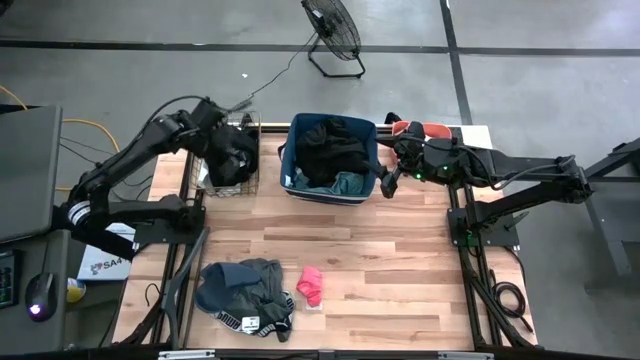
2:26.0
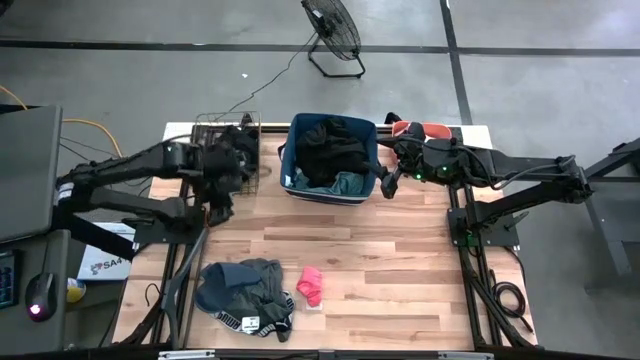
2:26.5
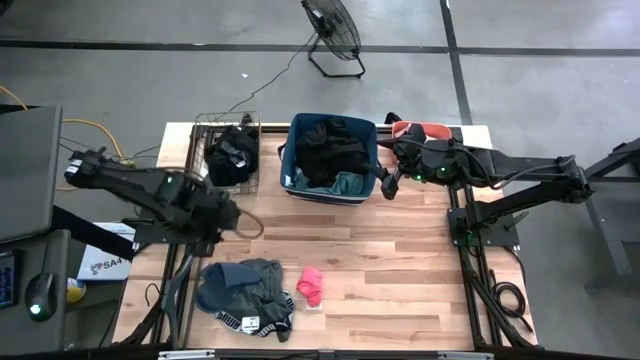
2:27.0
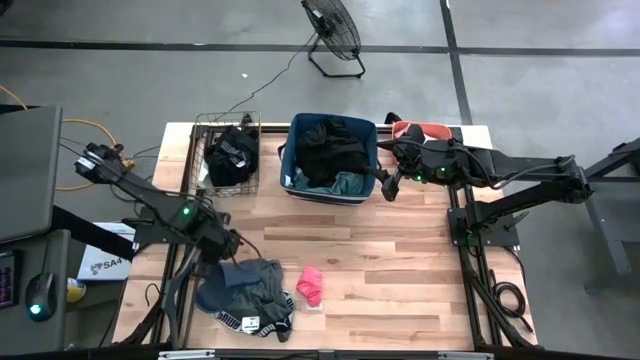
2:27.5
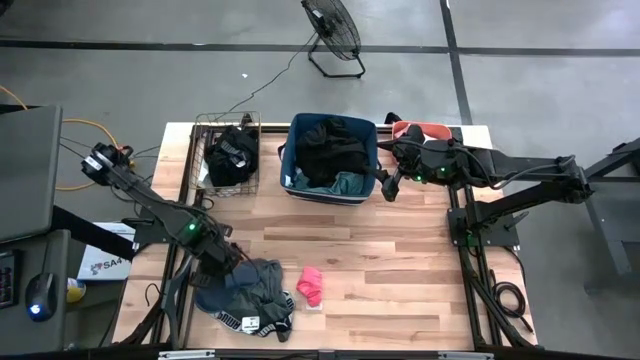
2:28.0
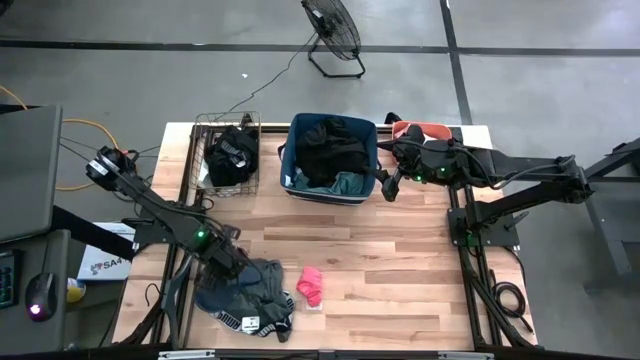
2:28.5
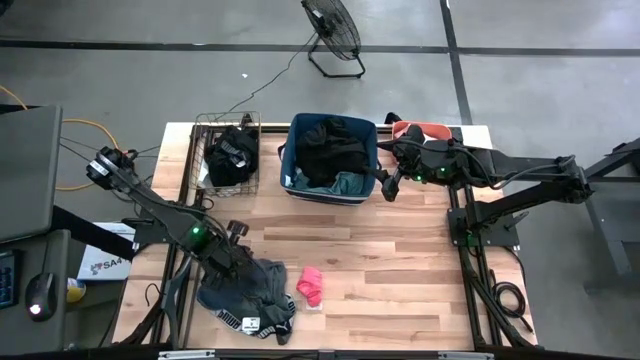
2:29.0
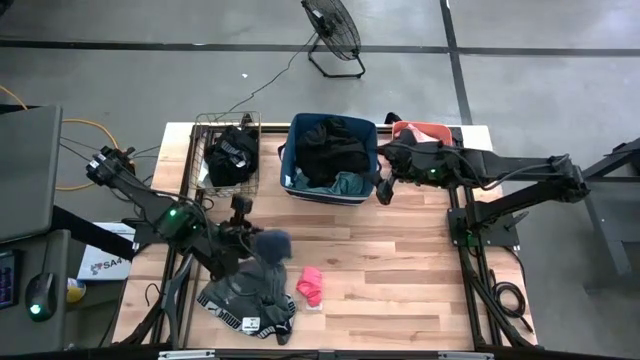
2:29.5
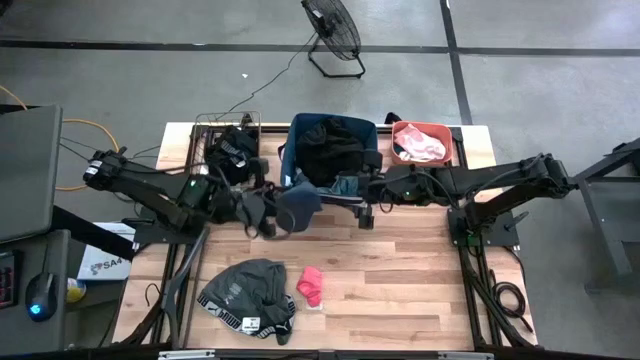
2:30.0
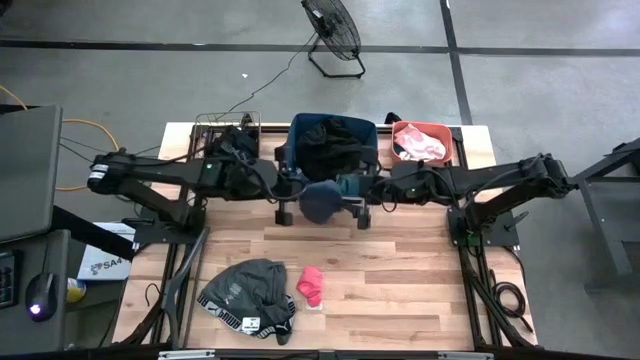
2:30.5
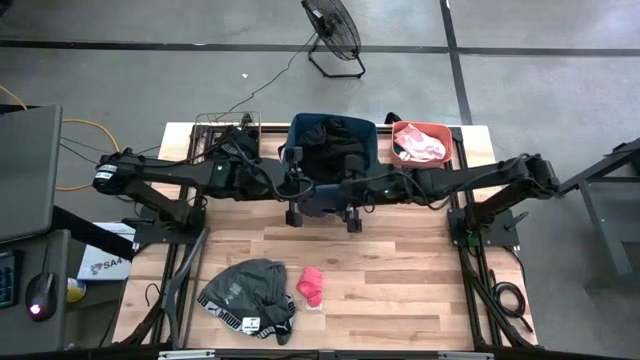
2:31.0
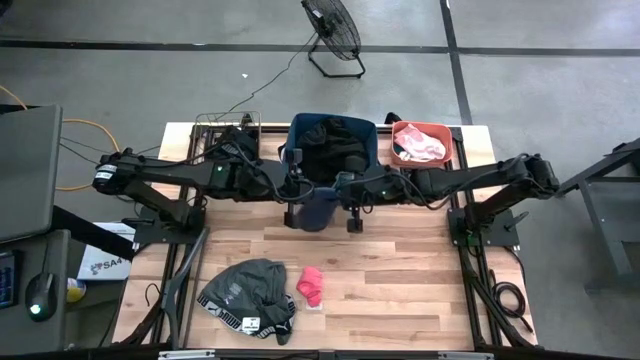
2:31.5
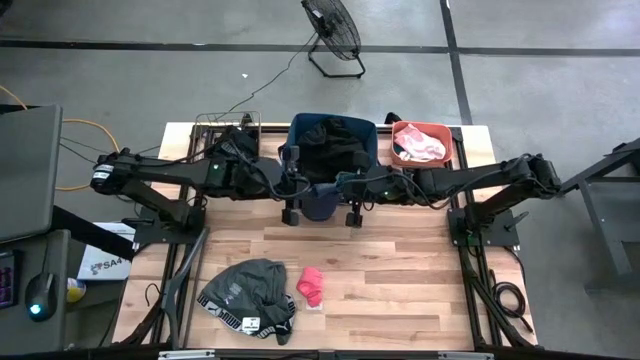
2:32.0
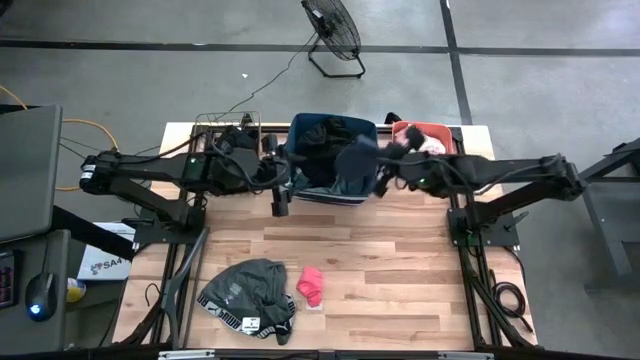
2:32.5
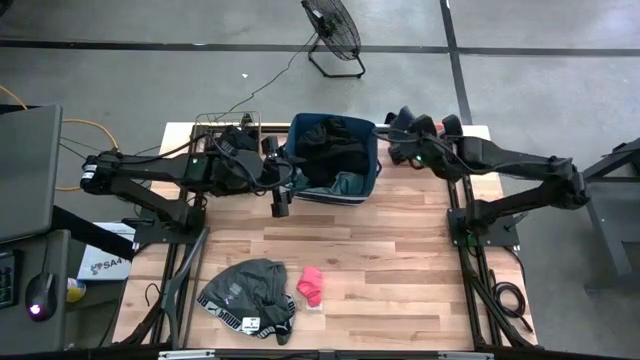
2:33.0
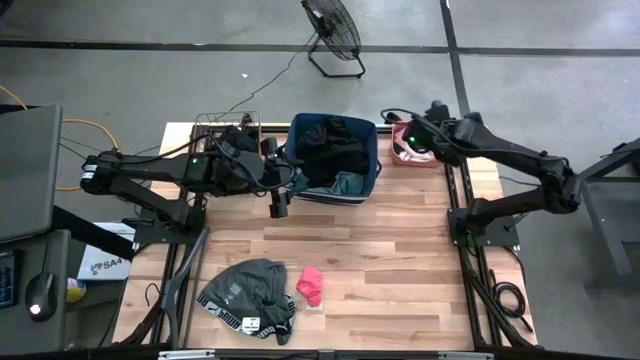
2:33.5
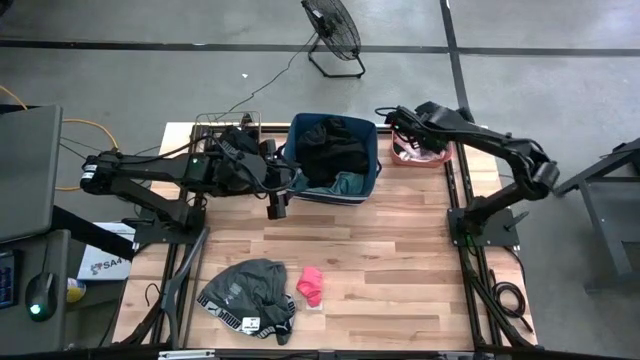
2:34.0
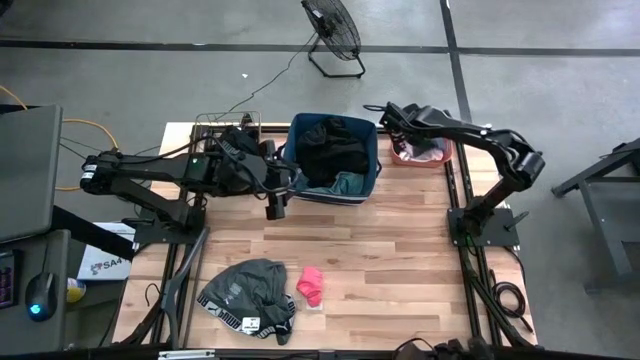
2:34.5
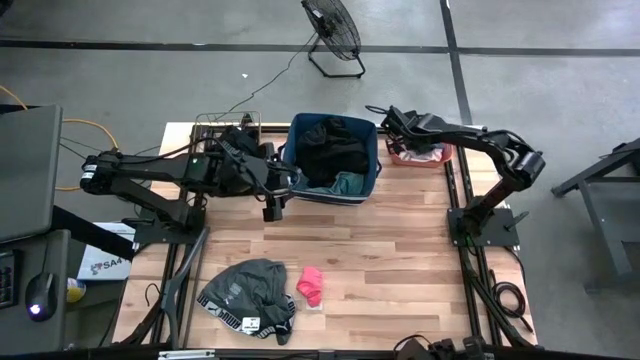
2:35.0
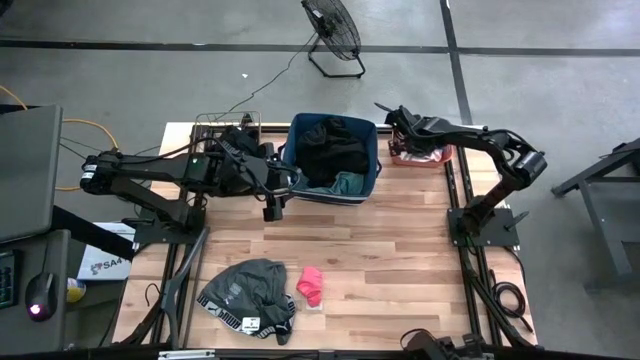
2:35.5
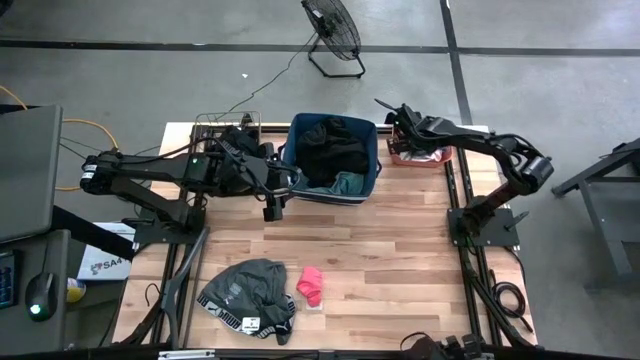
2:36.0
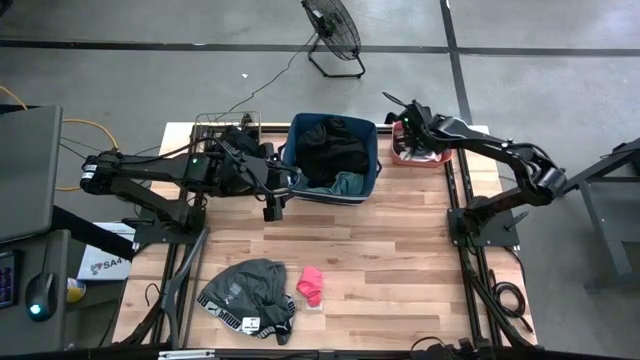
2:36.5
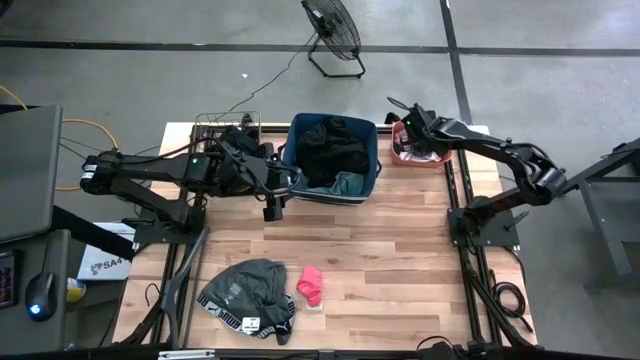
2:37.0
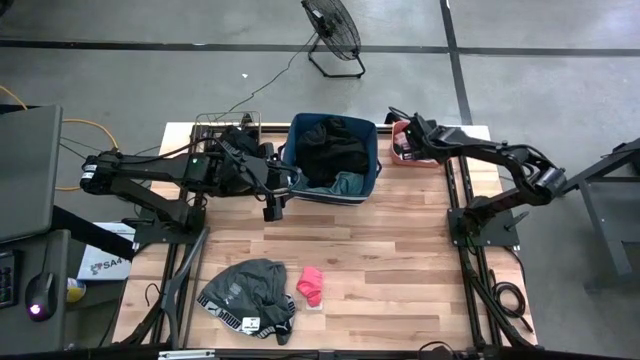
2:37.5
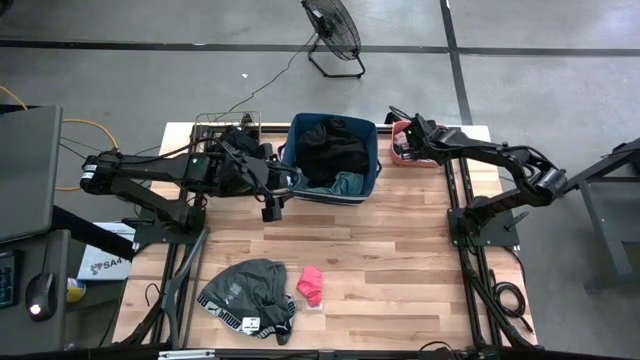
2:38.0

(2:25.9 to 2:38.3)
Task: Pick & Place Cloths
Put the blue sock into the orange bin

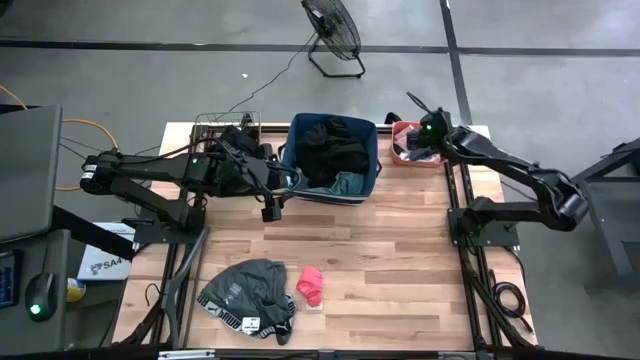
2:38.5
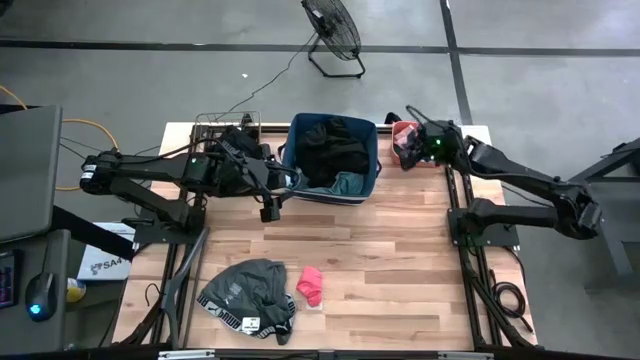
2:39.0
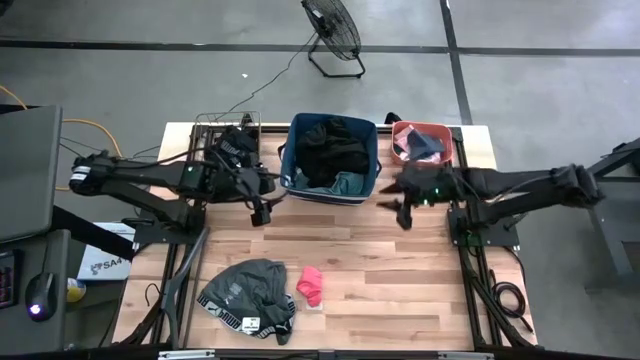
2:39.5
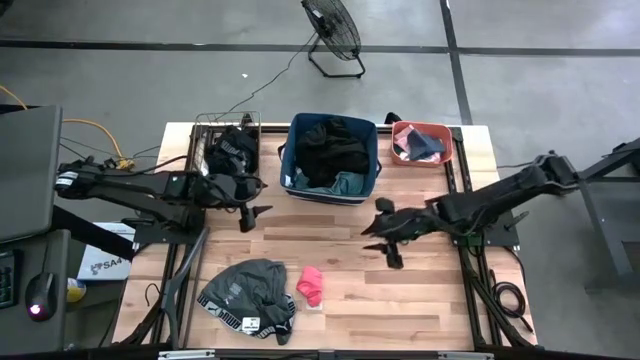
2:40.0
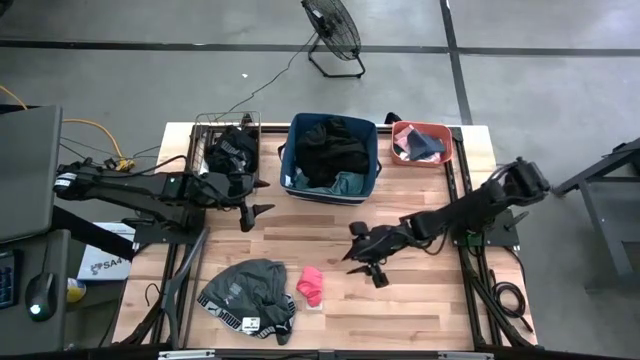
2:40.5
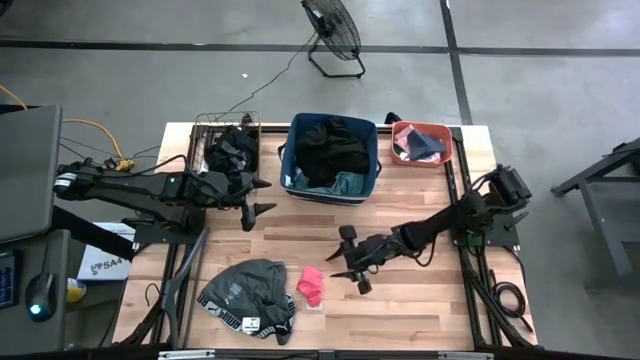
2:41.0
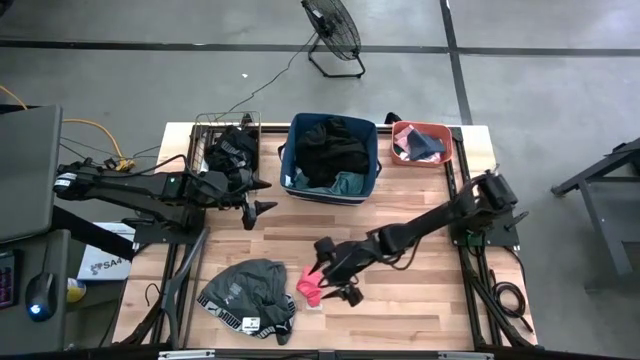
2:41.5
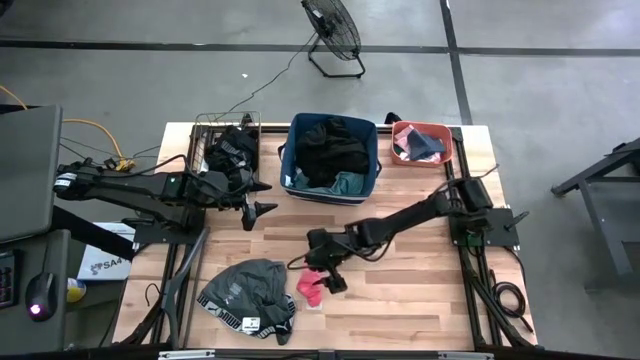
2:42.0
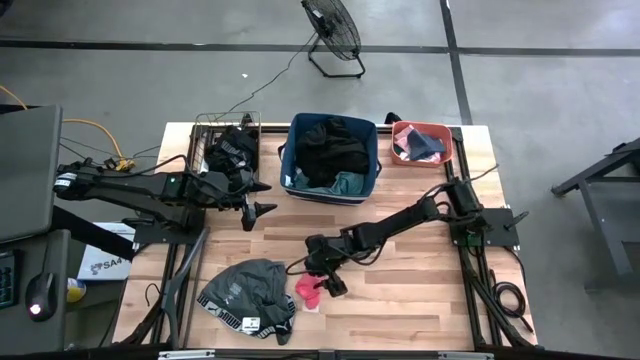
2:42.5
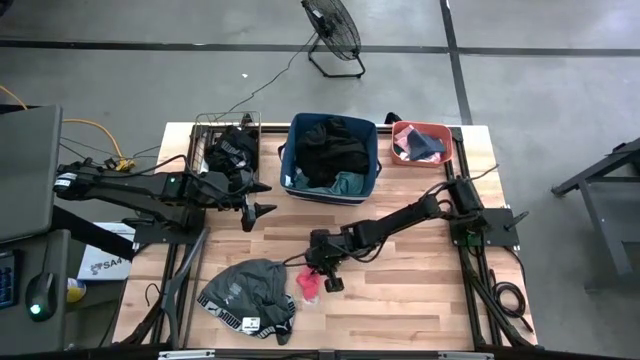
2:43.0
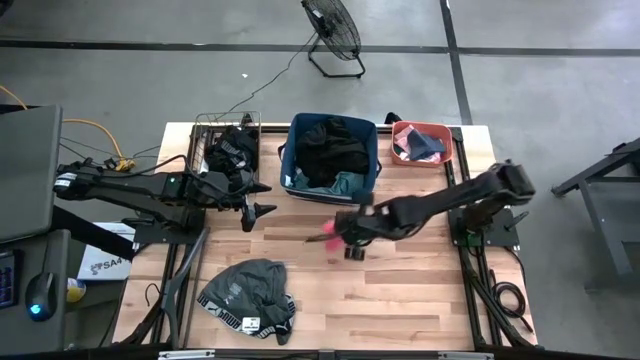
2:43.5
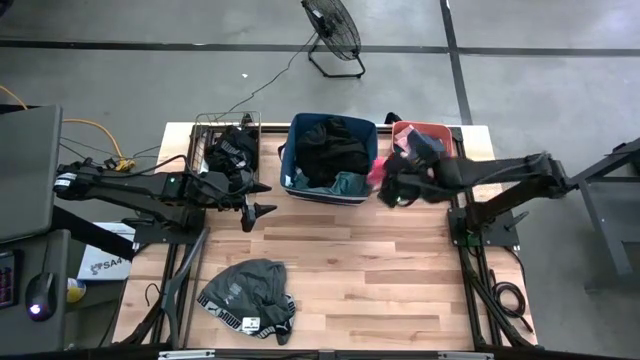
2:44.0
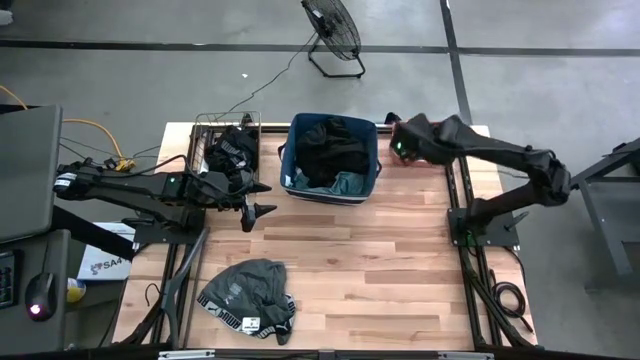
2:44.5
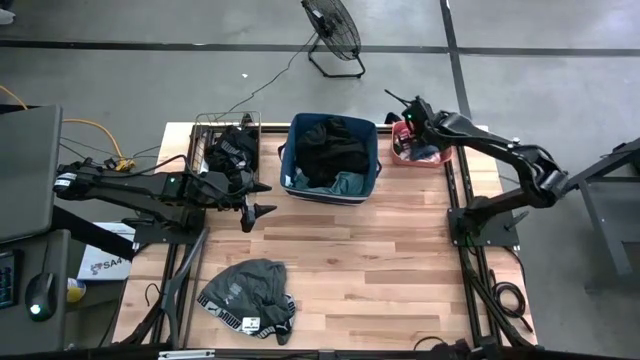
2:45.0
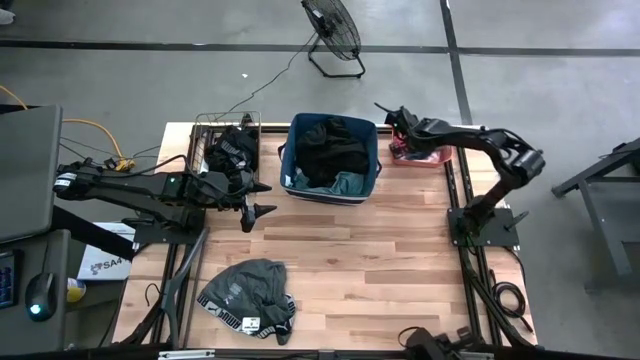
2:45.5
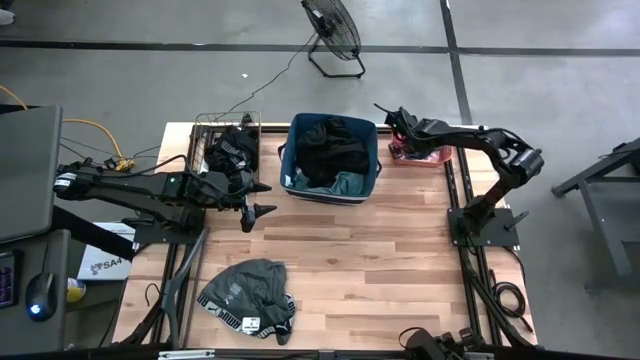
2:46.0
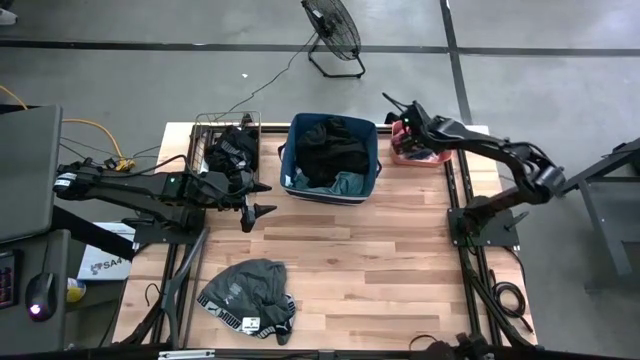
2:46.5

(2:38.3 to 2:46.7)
Put the orange sock into the orange bin

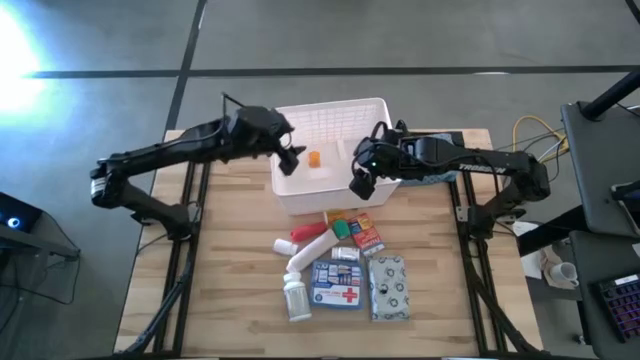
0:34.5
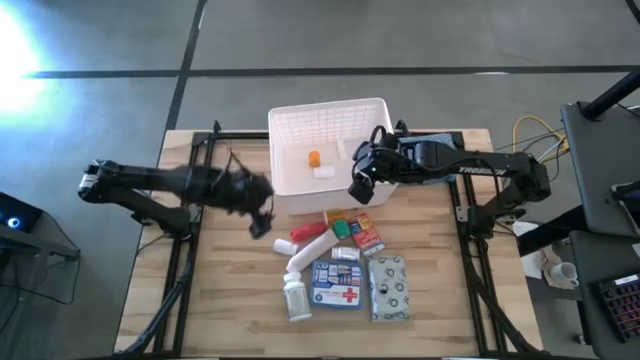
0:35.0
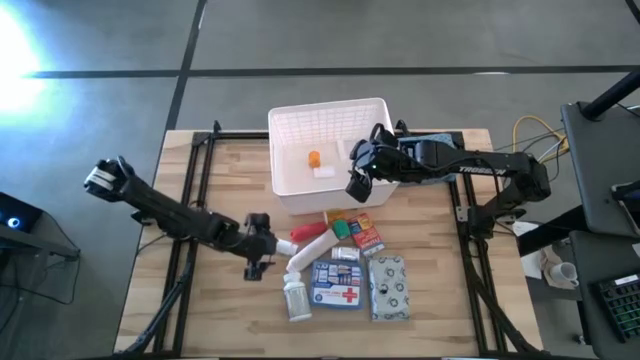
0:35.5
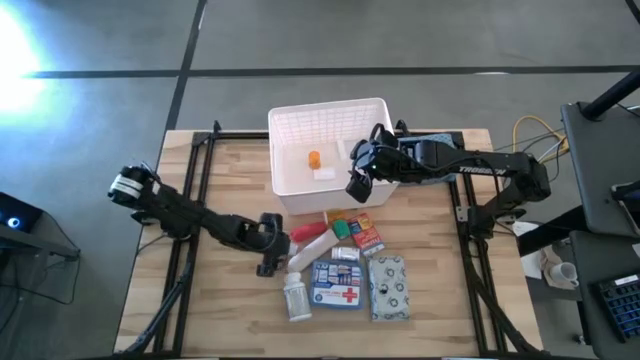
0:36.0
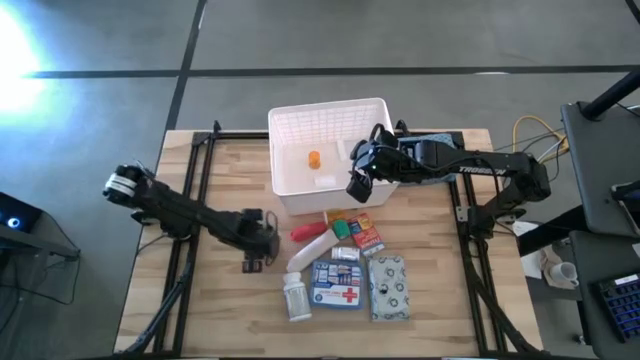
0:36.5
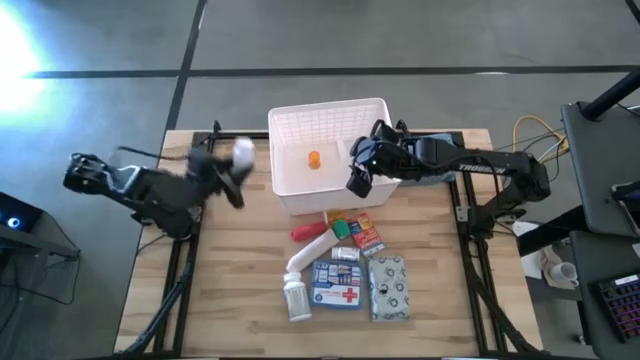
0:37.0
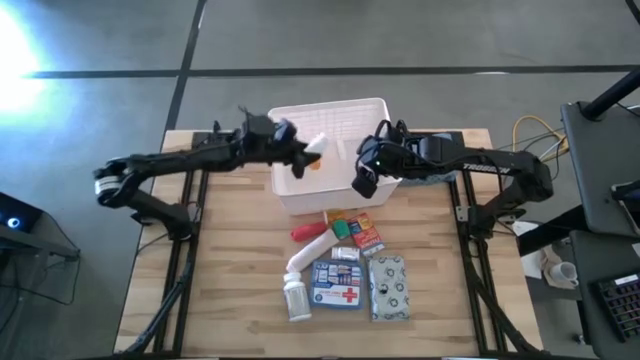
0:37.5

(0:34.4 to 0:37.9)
Task: Pick & place medical supplies in basket/bin
Put the white pill bottle into the white container
